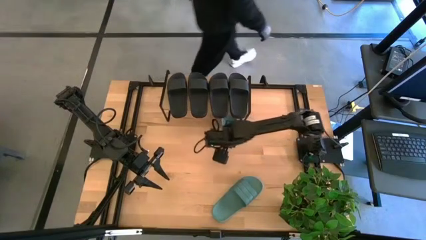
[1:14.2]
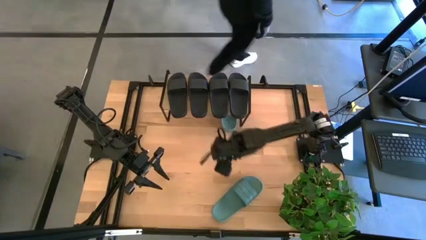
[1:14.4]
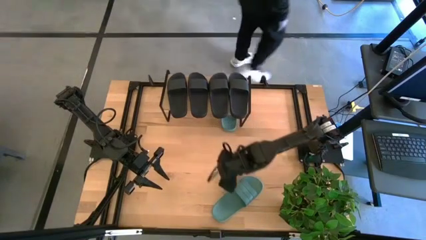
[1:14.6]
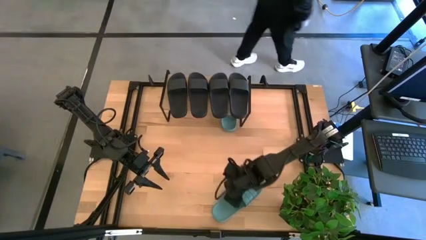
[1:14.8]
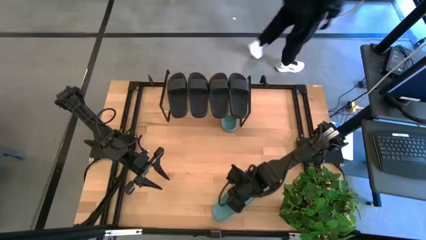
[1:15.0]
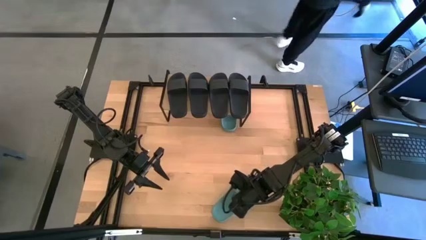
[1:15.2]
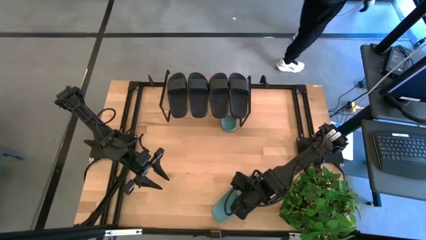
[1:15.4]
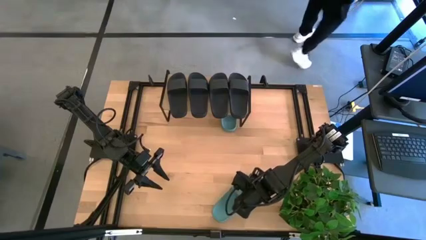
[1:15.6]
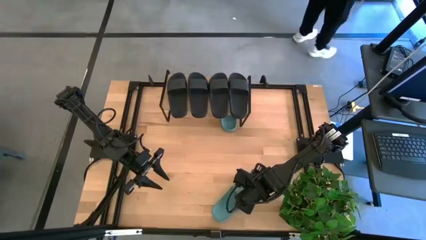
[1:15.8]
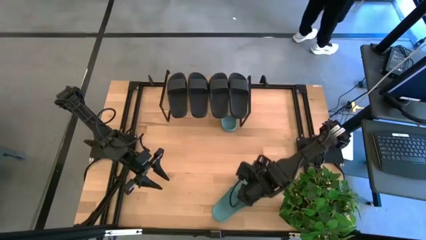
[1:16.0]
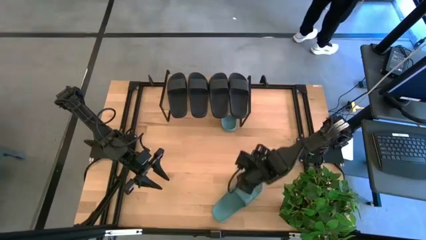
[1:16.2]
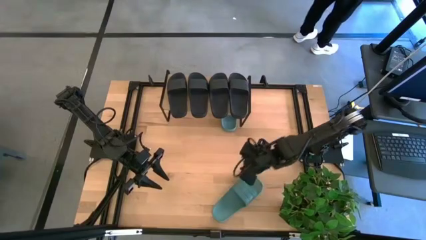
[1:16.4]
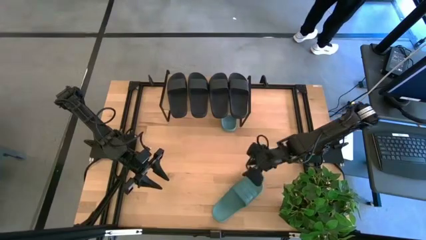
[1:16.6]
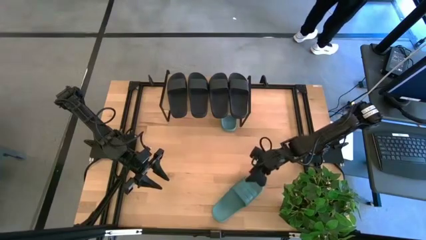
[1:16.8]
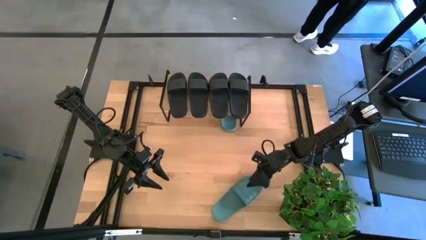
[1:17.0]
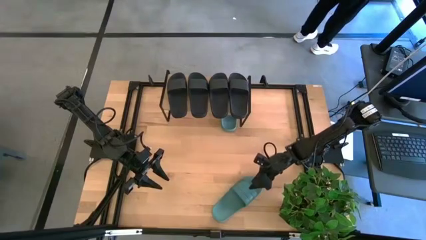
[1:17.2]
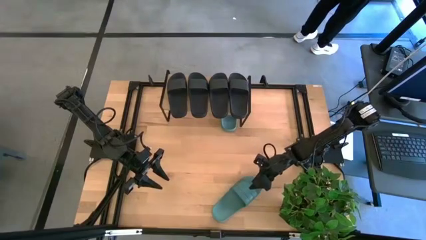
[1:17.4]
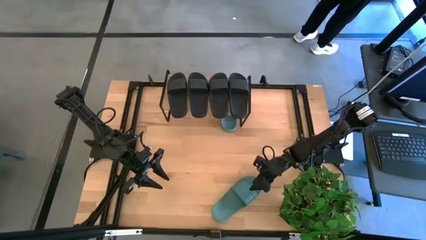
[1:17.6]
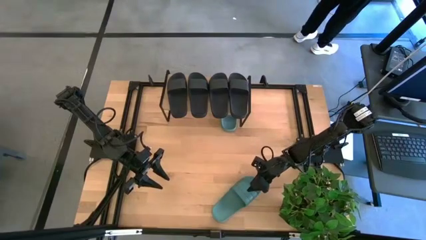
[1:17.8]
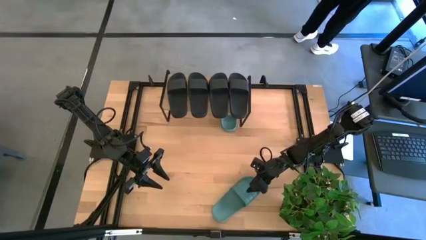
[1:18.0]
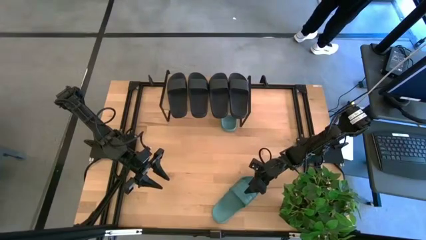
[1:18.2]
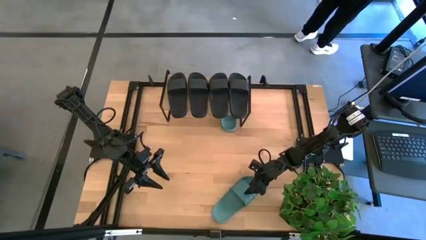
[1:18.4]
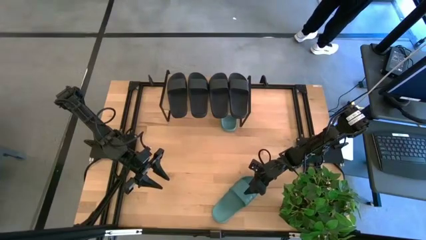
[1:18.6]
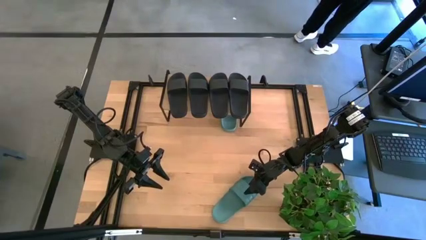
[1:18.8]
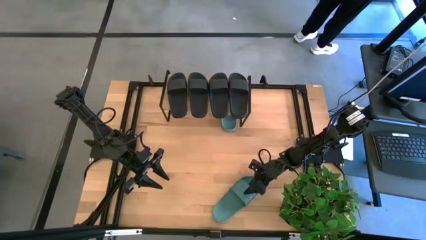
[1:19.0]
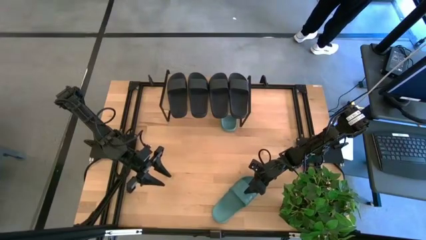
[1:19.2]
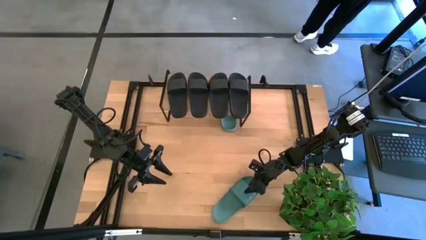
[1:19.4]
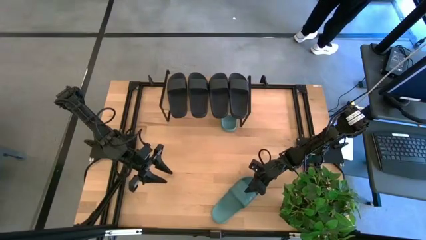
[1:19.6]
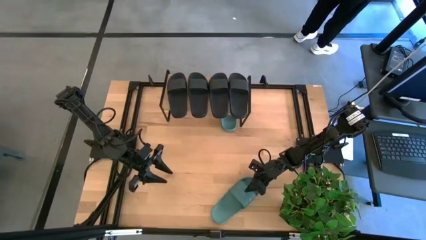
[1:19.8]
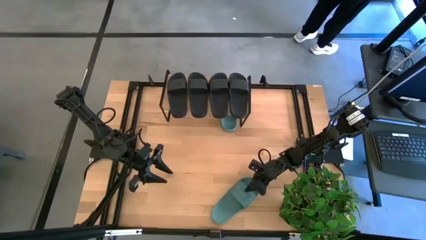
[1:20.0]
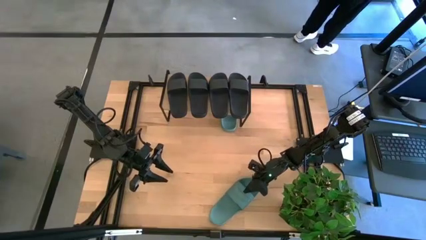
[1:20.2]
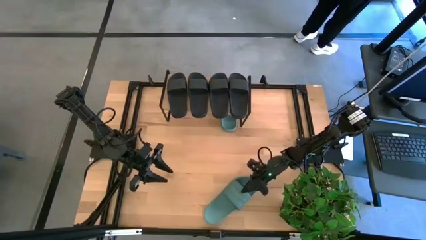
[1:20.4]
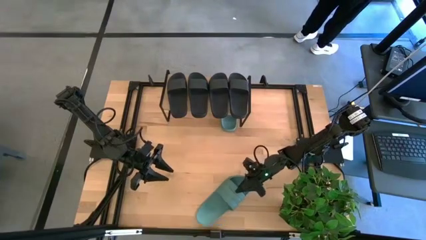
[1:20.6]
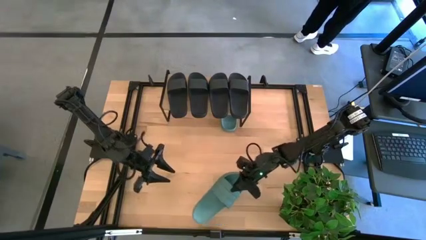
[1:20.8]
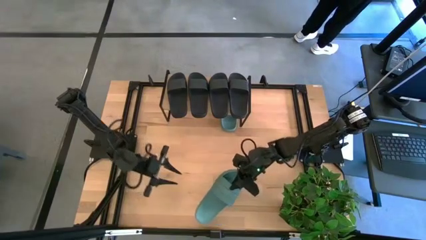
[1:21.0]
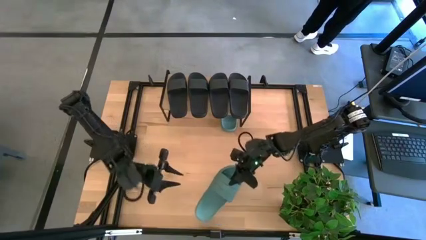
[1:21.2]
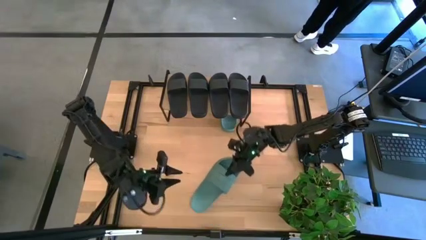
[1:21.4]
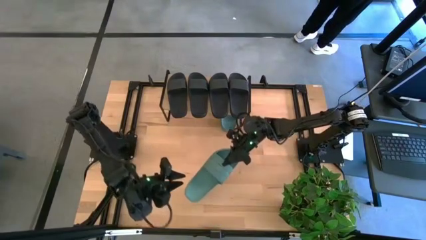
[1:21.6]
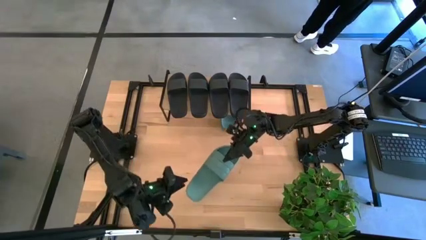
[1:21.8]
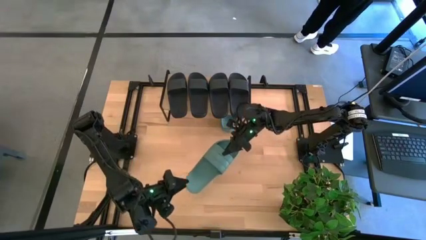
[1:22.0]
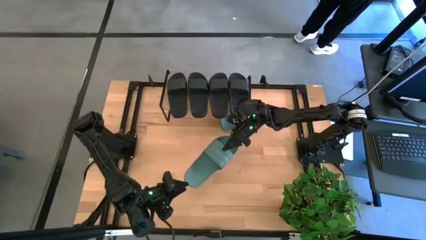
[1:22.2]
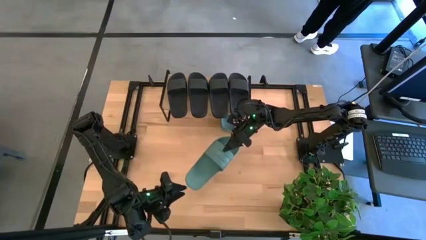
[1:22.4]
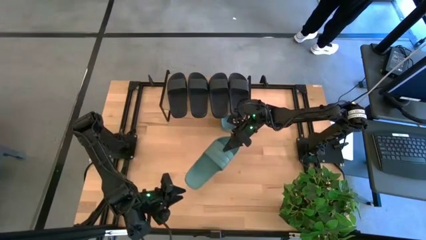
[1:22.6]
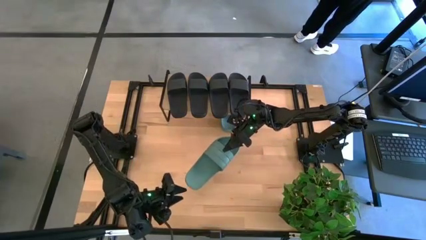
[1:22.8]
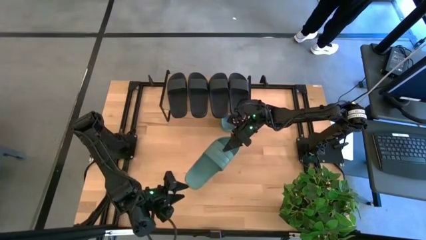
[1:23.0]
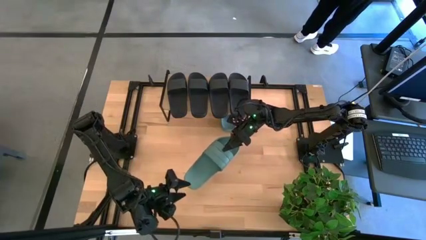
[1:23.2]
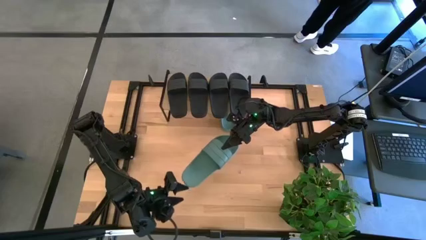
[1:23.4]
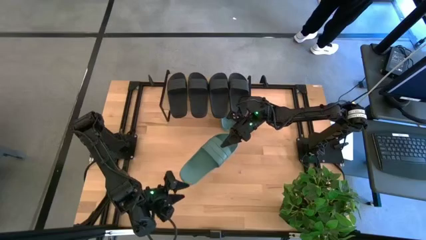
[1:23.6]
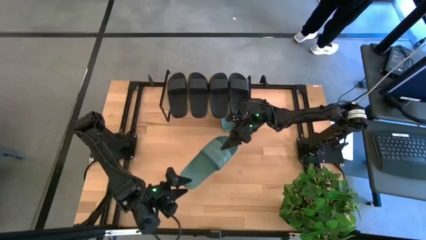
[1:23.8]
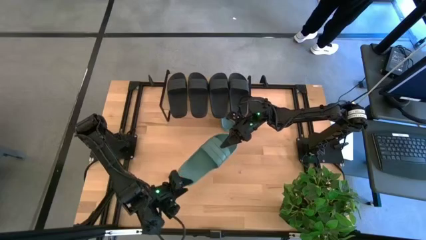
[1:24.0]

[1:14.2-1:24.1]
Task: Pick and place slides into the shelf
Put the green slide under the shelf
